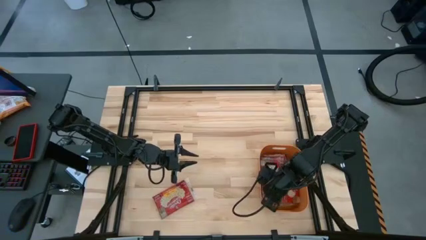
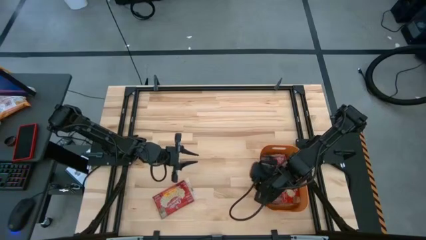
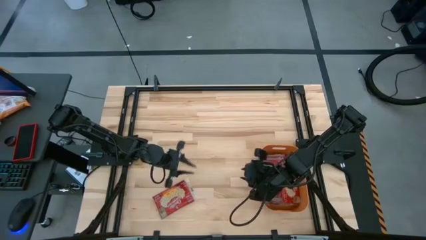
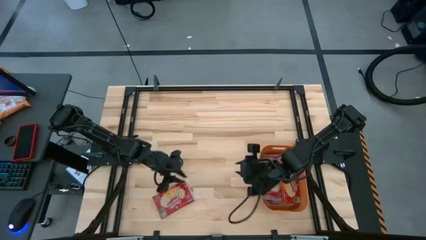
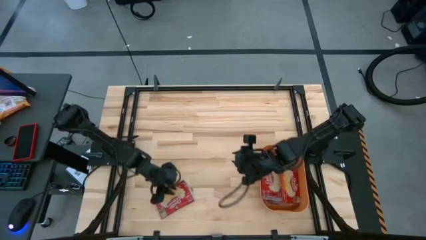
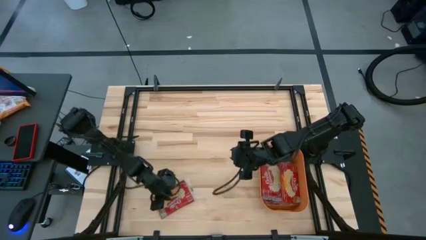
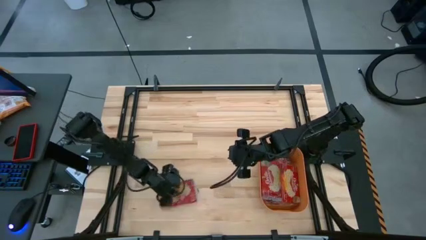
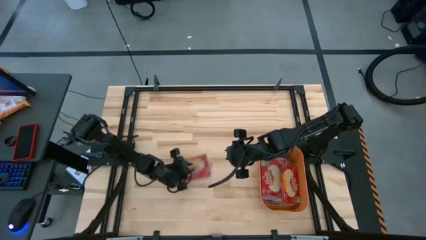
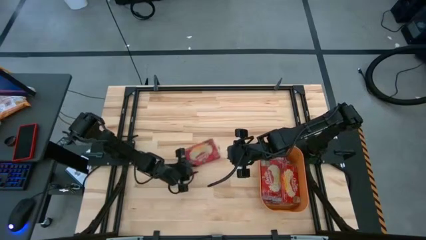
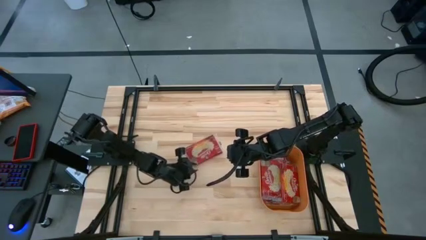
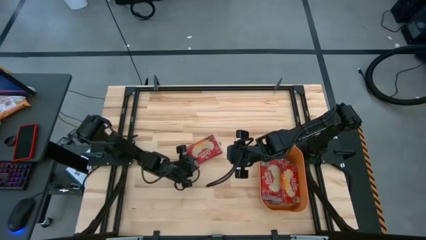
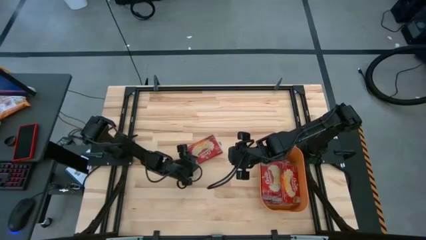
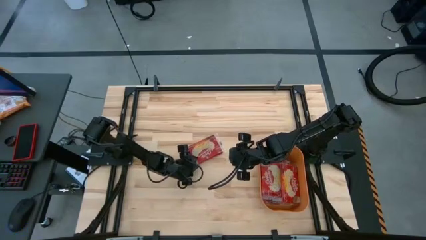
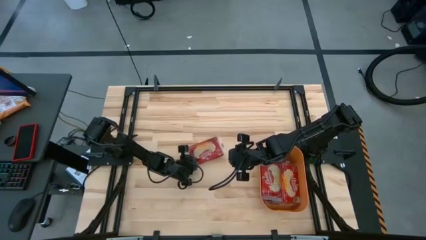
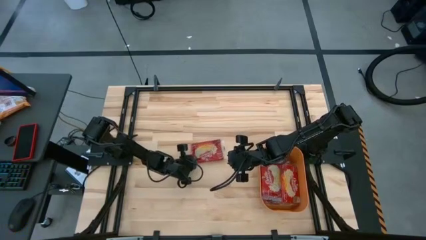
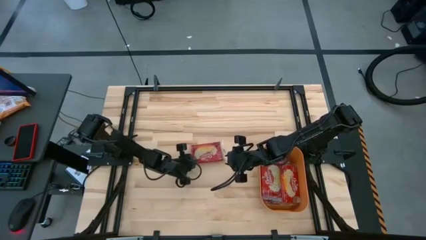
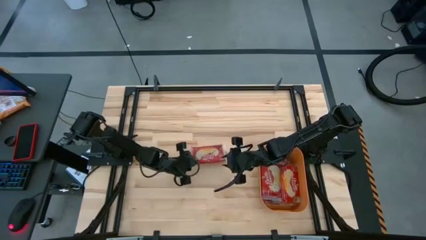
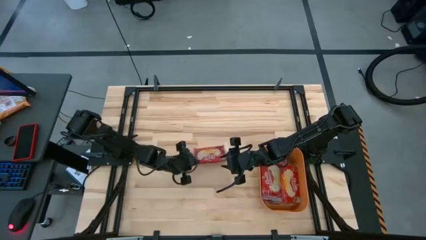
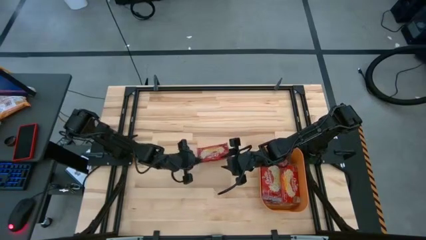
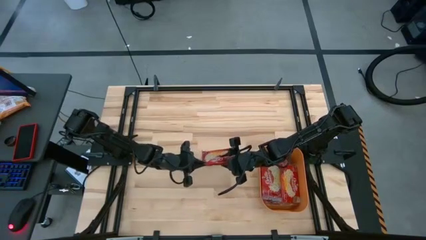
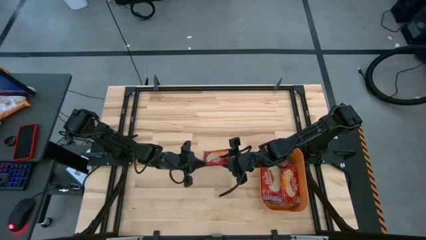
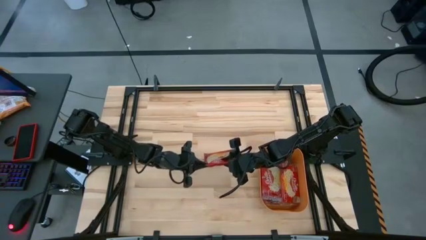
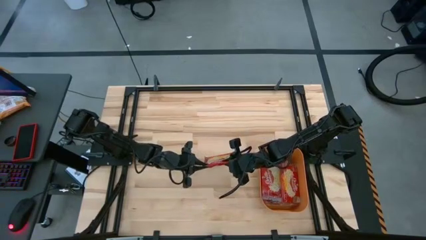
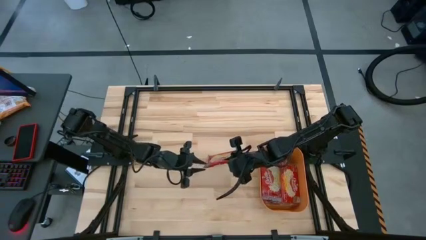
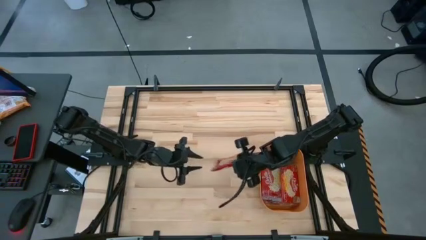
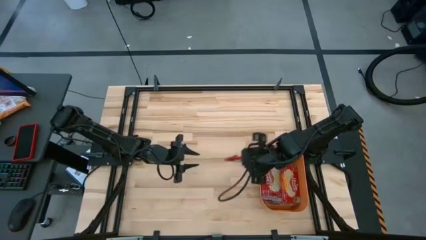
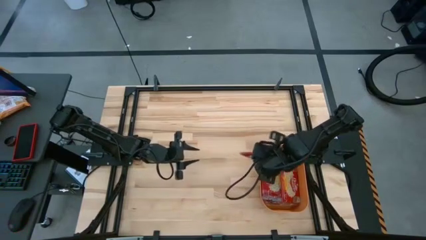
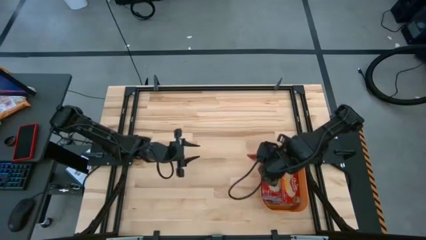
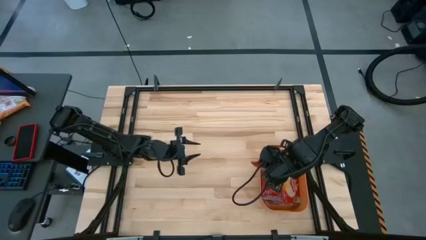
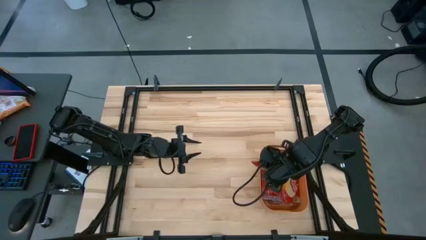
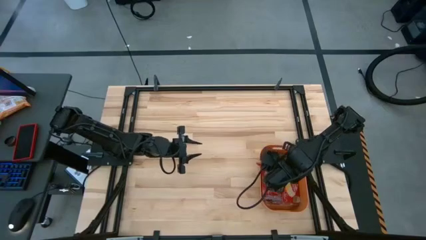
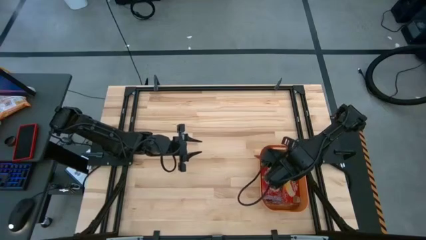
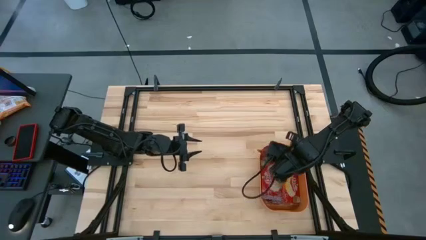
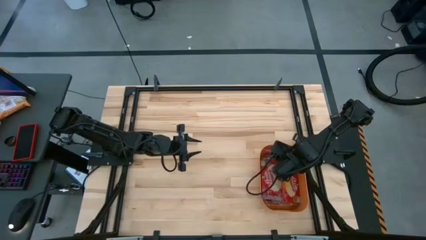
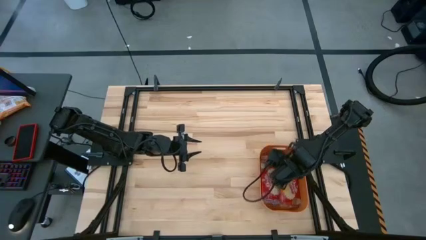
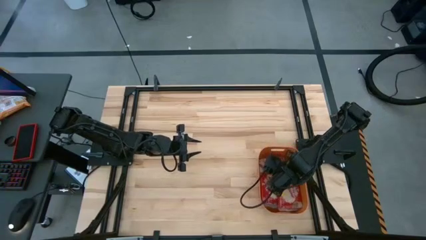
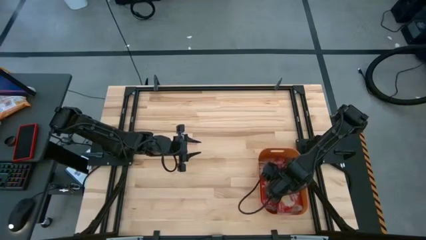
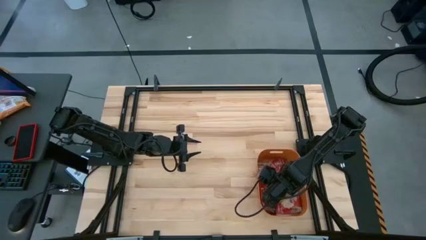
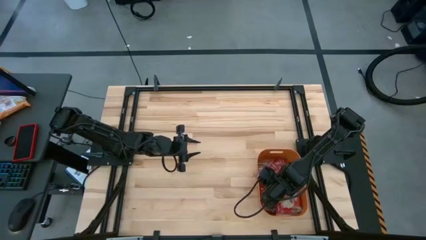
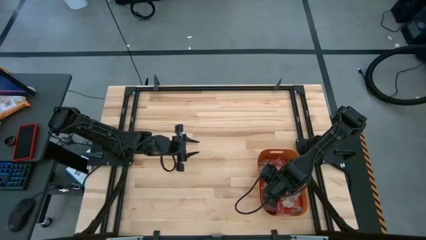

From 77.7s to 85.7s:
Task: Sort popcorn bags into baskets
Put the red popcorn bag into the orange bin

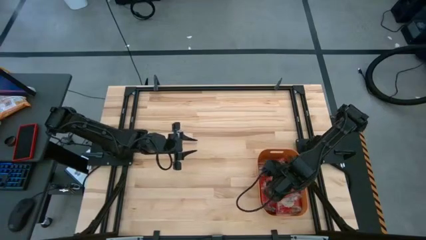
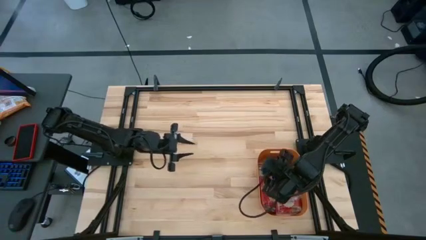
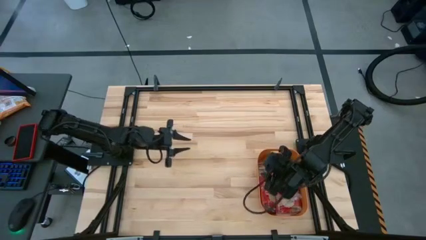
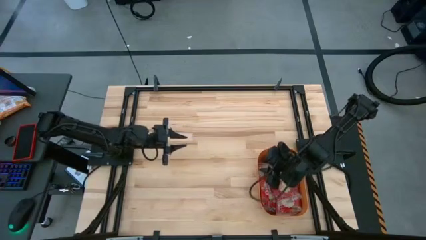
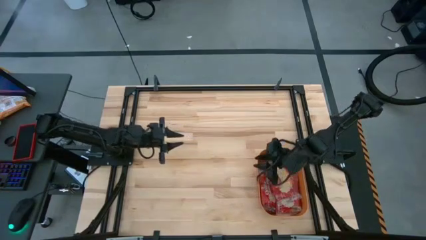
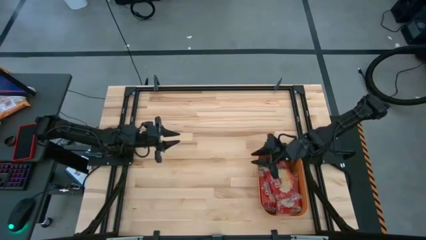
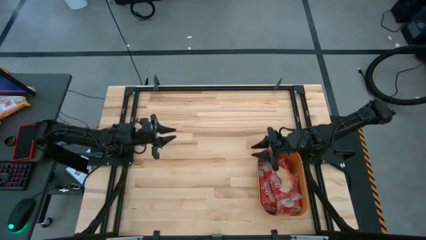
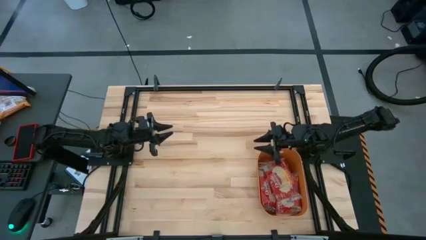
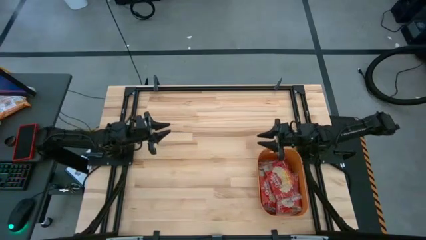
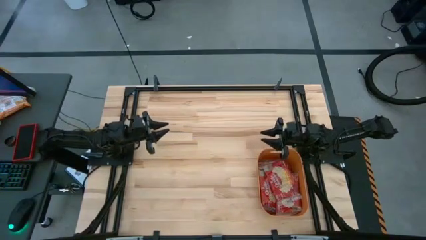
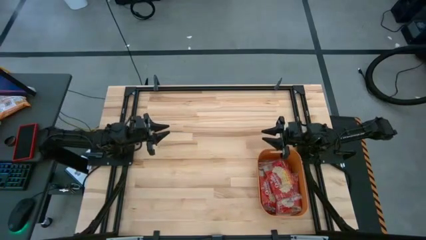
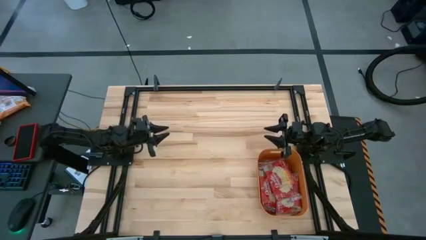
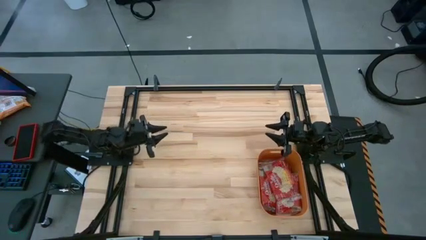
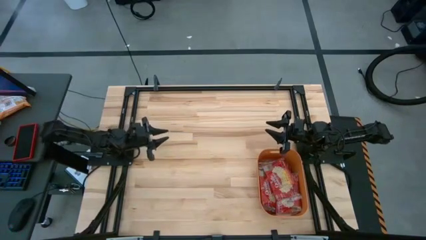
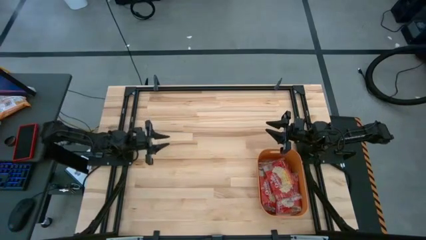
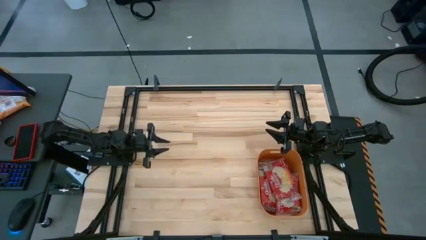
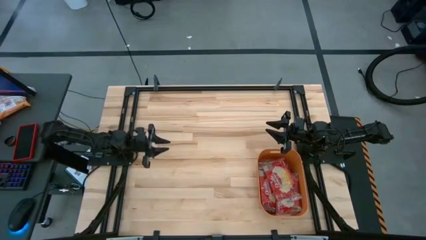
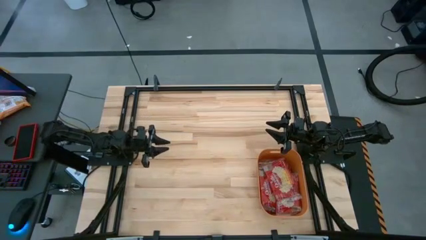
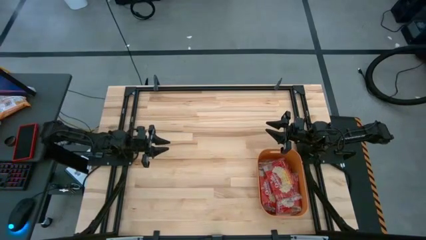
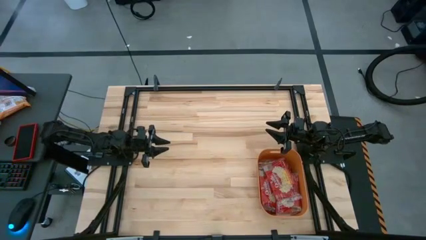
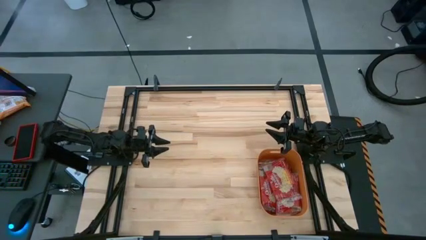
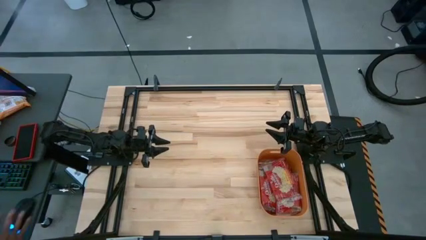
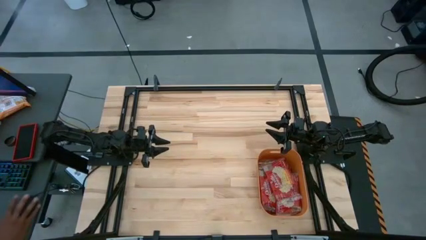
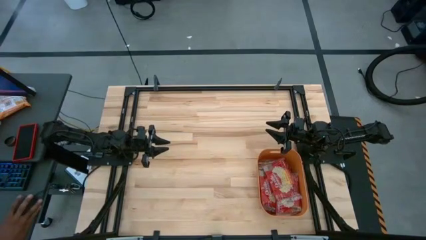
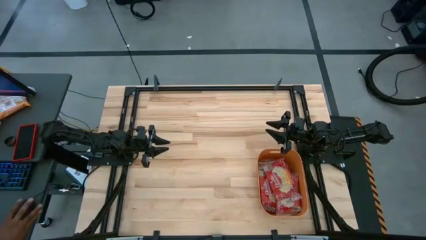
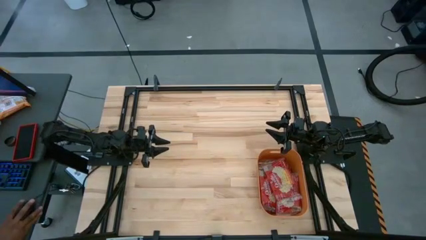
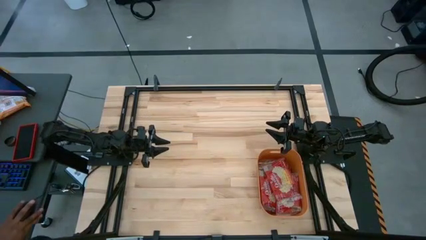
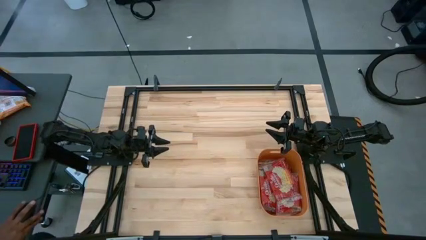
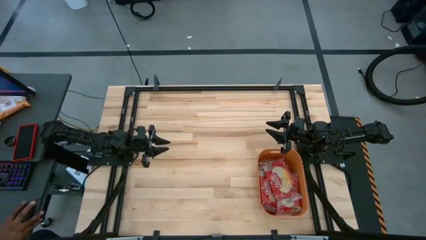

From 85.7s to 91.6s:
Return to Home Position

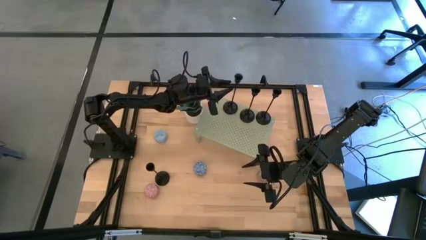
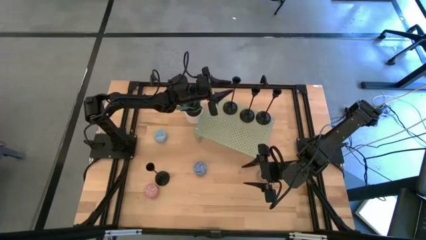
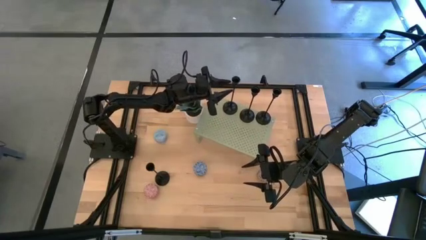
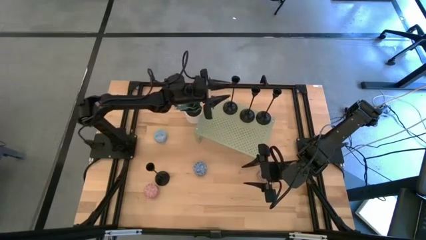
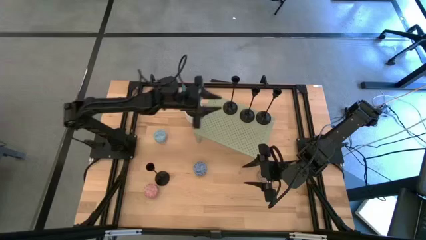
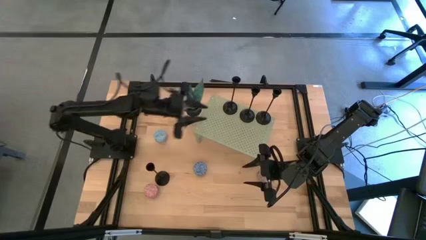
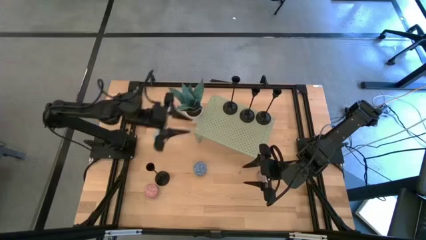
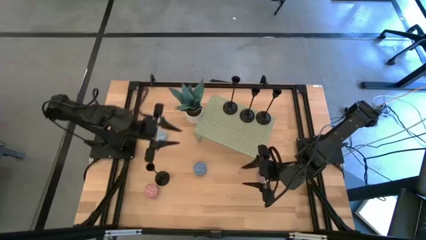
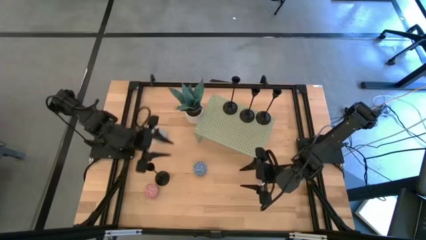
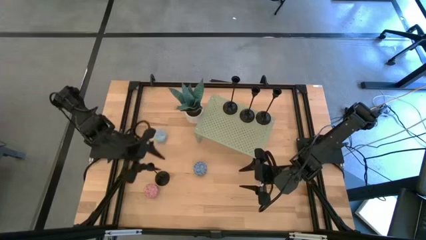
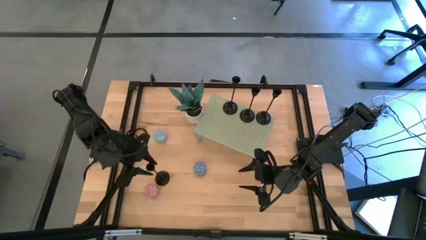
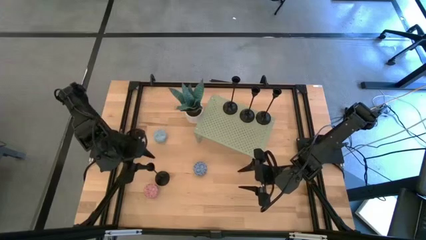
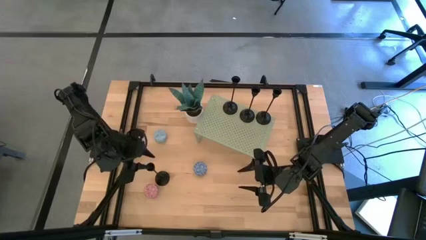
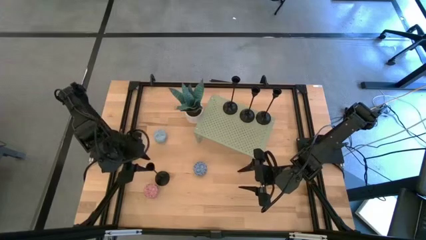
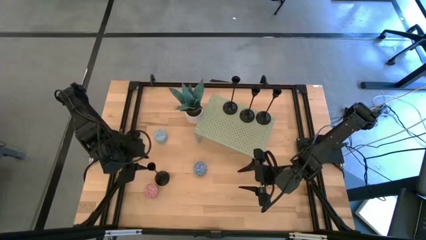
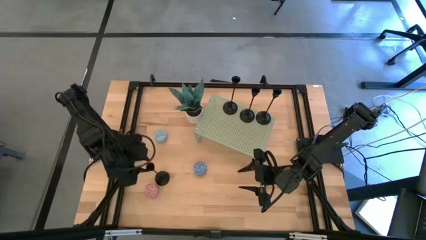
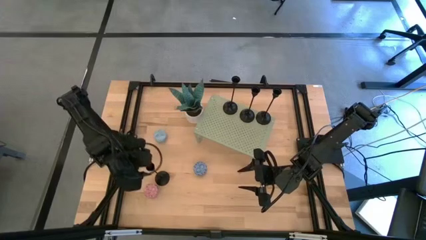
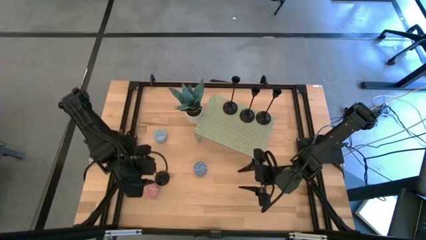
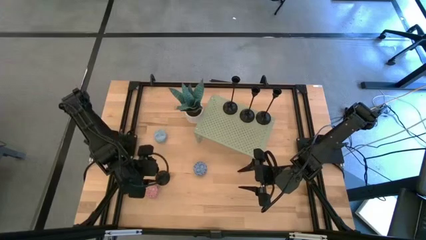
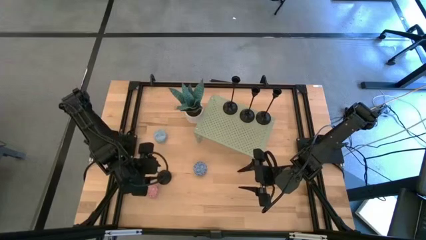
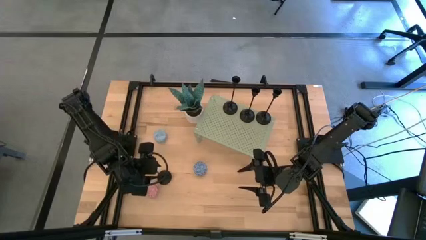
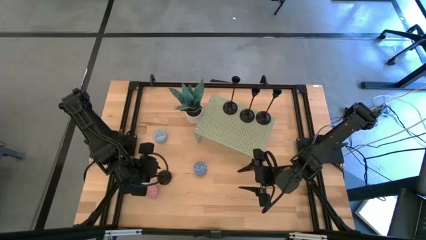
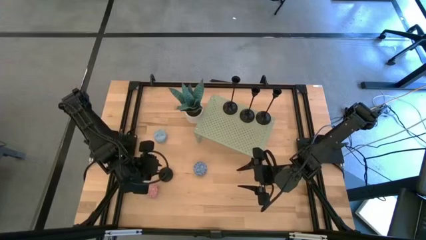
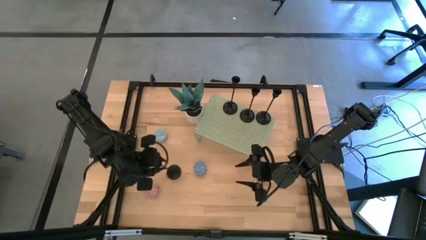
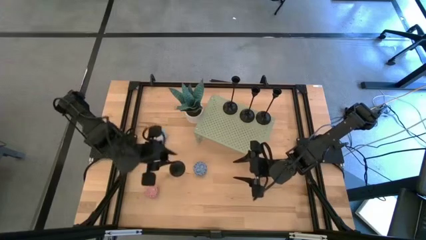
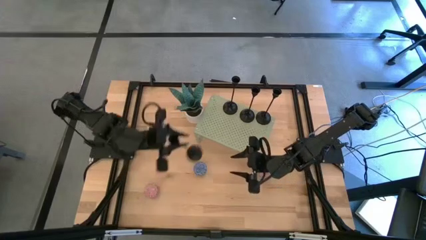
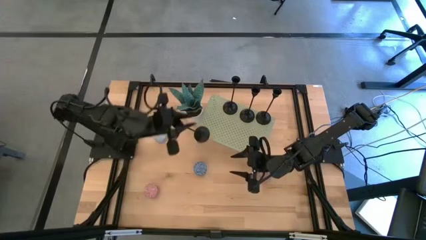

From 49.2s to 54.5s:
Task: Stock candles and holders on shelf
Align the black candle holder with the other black candle holders on the shelf
